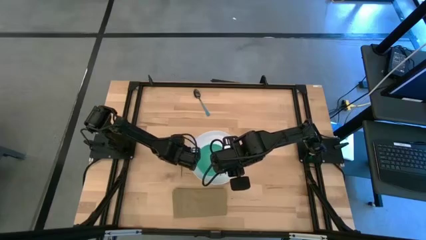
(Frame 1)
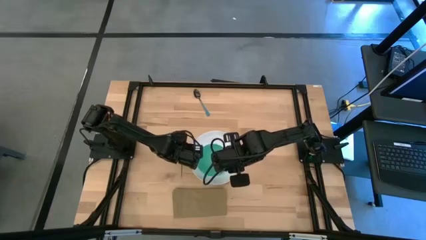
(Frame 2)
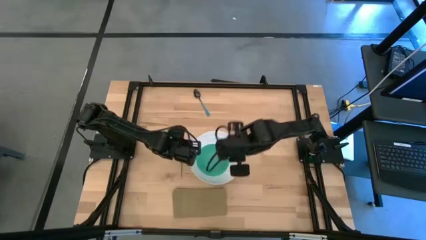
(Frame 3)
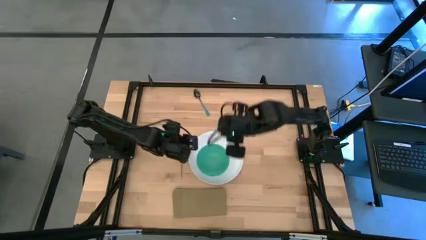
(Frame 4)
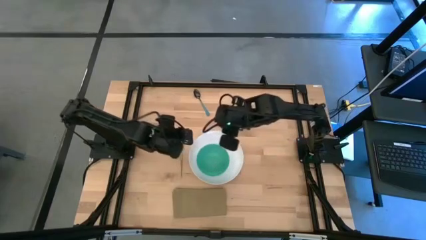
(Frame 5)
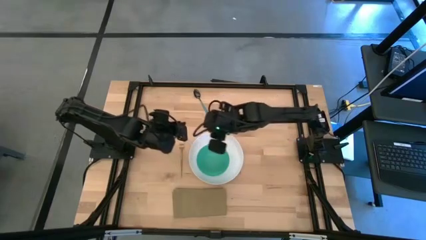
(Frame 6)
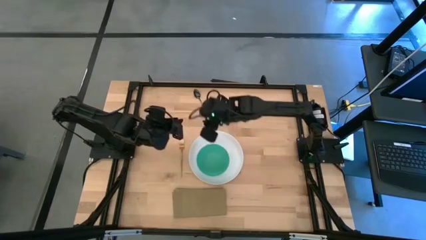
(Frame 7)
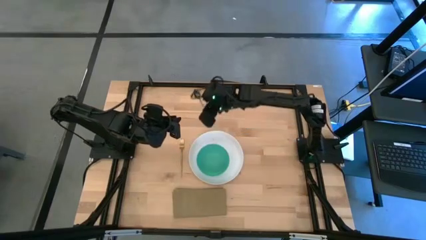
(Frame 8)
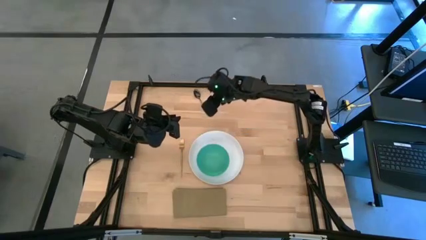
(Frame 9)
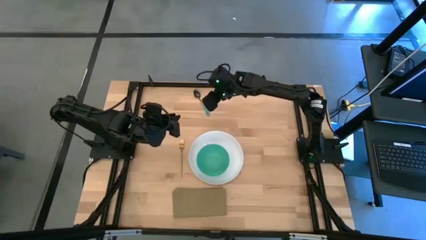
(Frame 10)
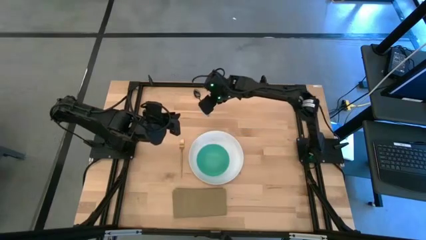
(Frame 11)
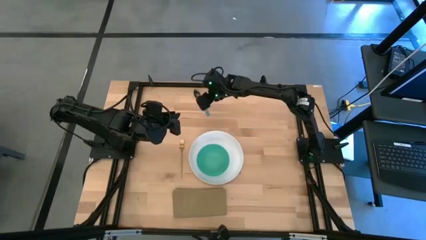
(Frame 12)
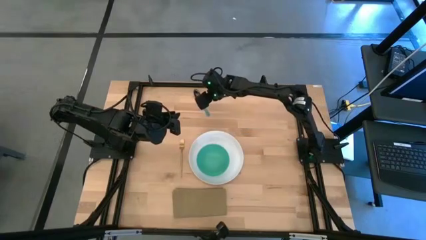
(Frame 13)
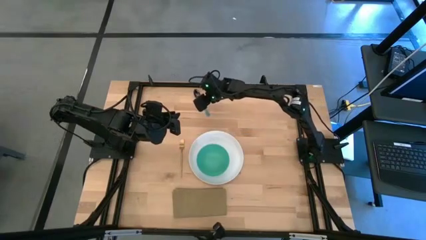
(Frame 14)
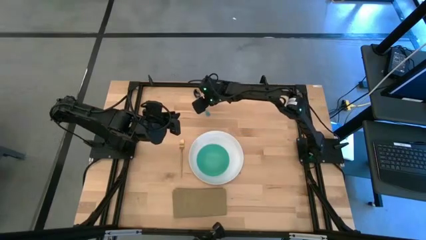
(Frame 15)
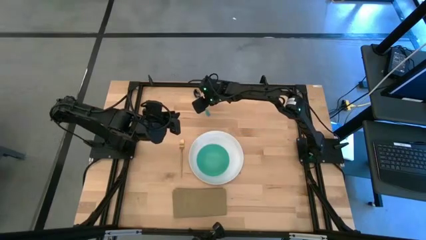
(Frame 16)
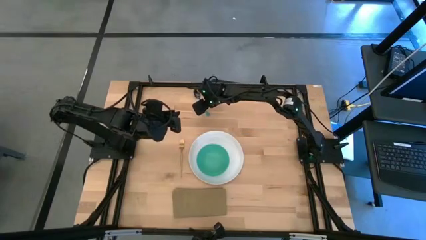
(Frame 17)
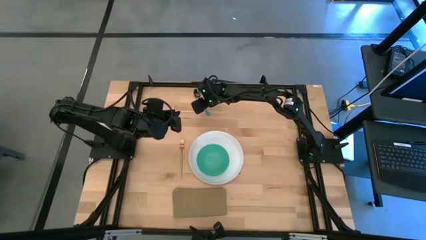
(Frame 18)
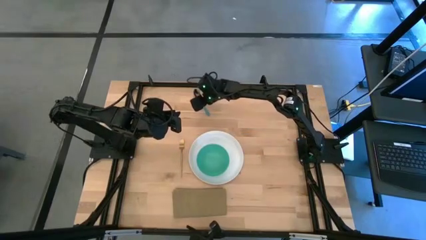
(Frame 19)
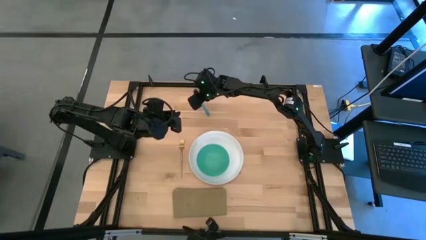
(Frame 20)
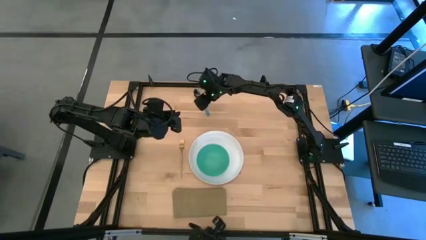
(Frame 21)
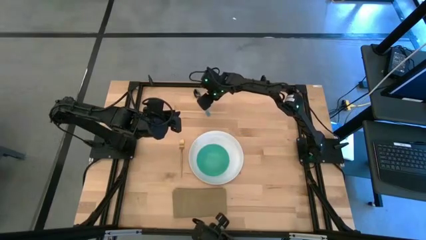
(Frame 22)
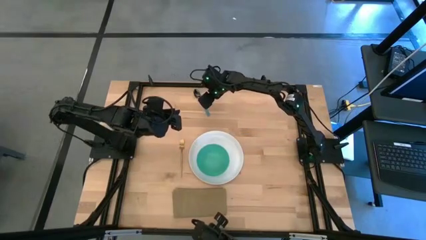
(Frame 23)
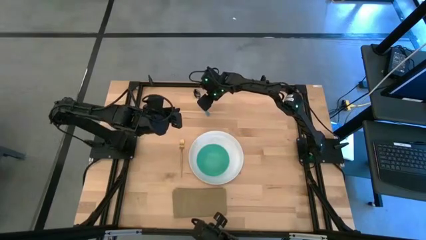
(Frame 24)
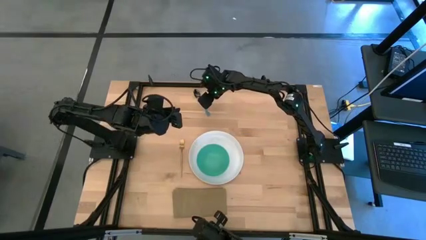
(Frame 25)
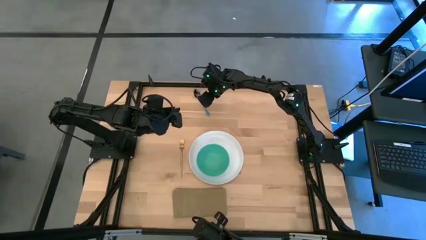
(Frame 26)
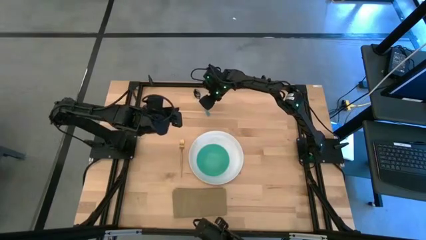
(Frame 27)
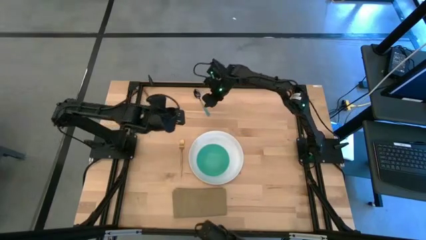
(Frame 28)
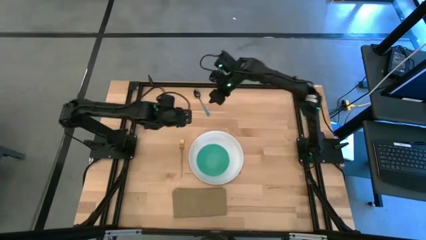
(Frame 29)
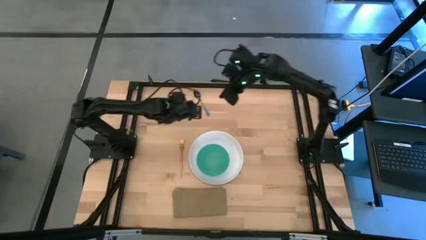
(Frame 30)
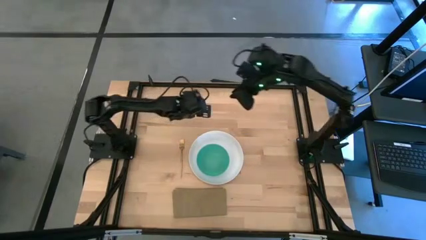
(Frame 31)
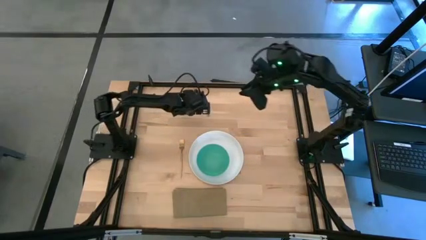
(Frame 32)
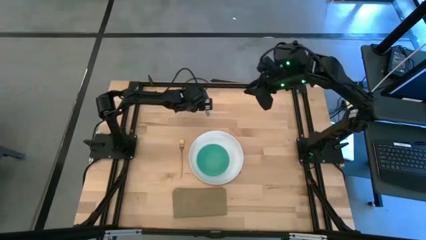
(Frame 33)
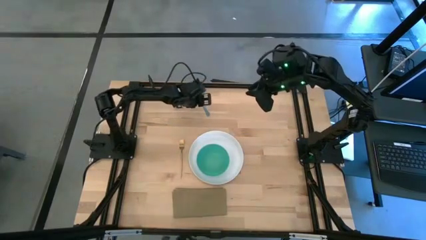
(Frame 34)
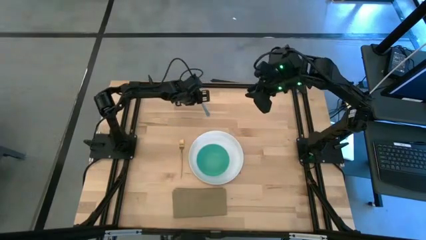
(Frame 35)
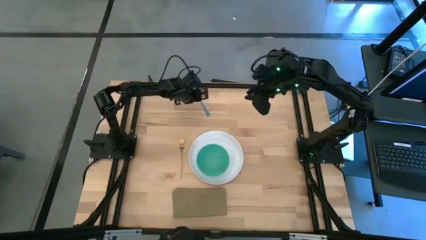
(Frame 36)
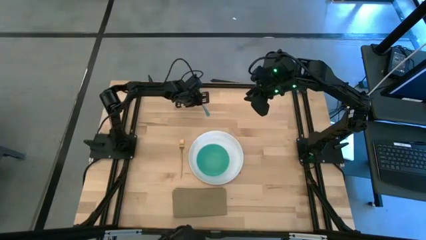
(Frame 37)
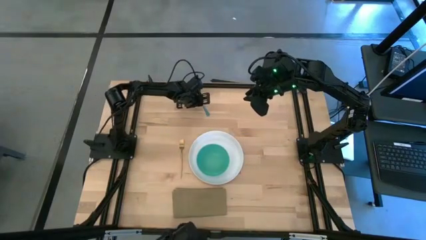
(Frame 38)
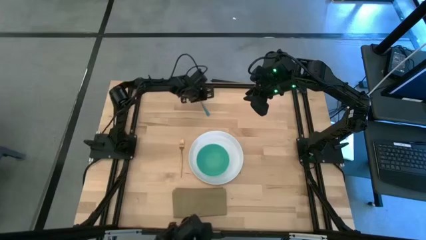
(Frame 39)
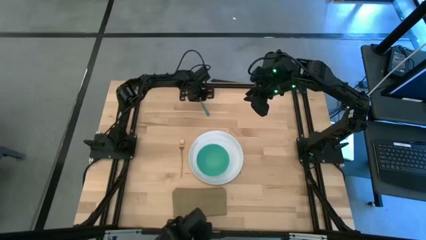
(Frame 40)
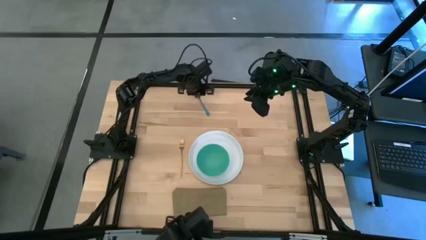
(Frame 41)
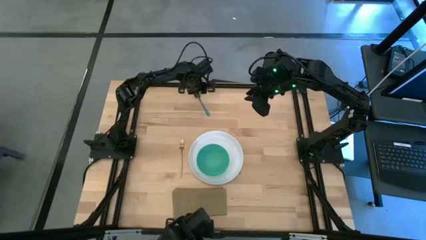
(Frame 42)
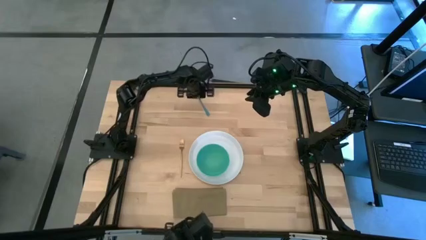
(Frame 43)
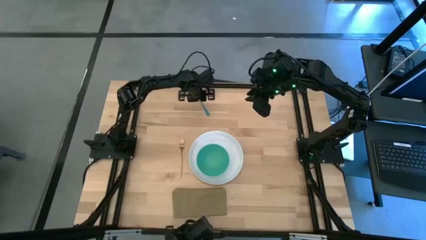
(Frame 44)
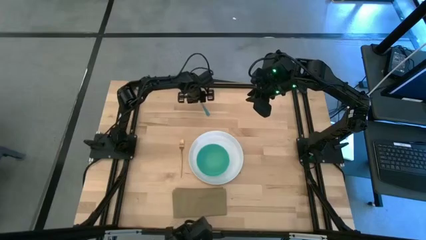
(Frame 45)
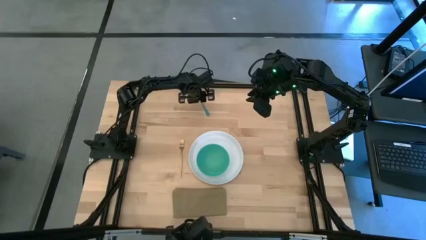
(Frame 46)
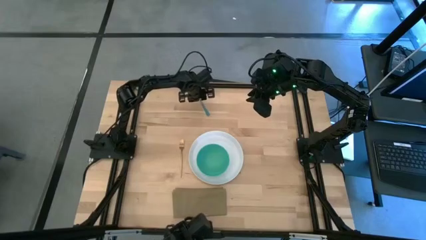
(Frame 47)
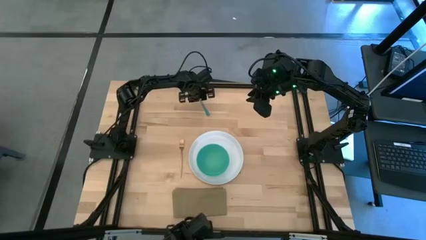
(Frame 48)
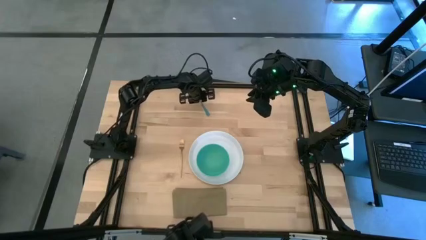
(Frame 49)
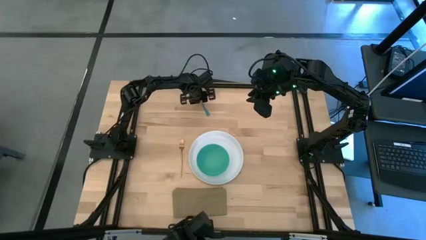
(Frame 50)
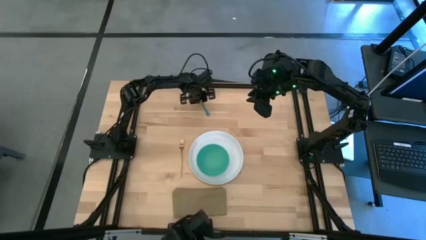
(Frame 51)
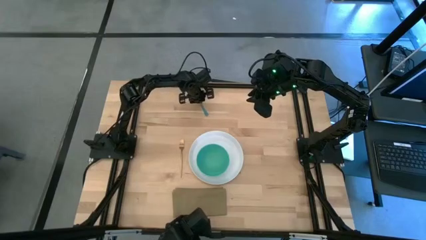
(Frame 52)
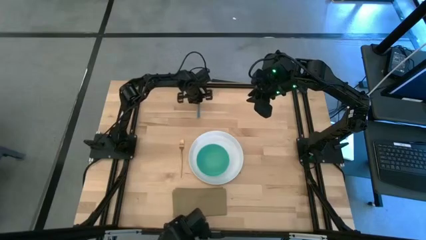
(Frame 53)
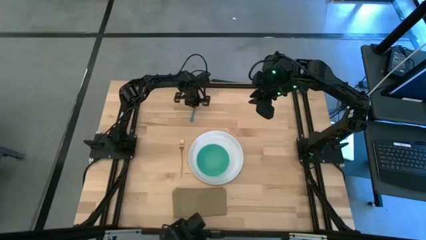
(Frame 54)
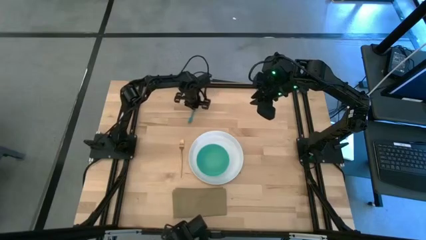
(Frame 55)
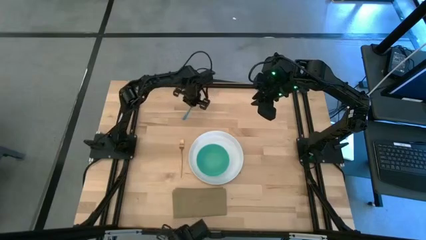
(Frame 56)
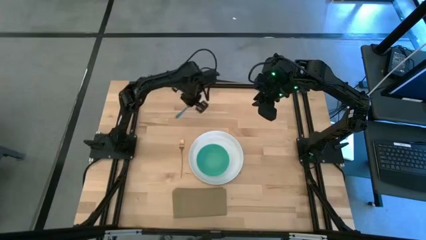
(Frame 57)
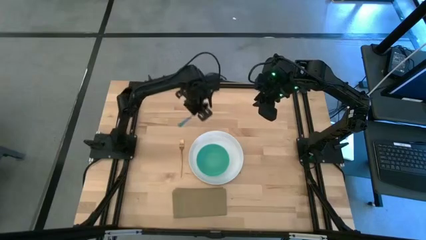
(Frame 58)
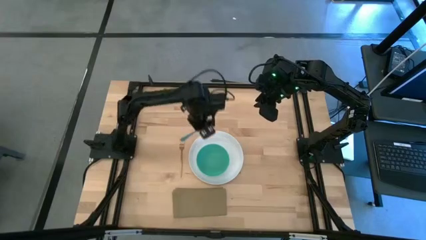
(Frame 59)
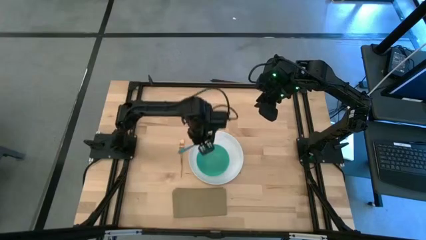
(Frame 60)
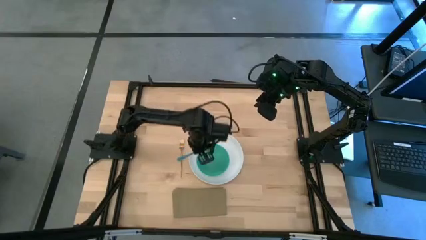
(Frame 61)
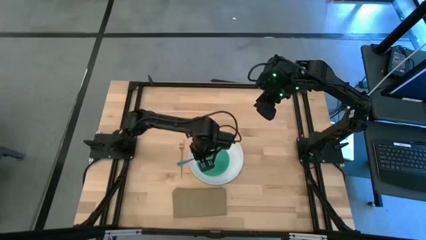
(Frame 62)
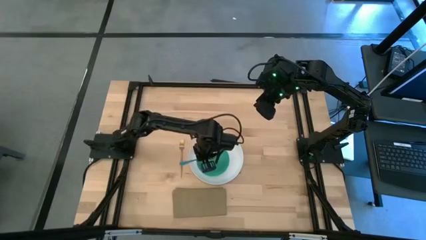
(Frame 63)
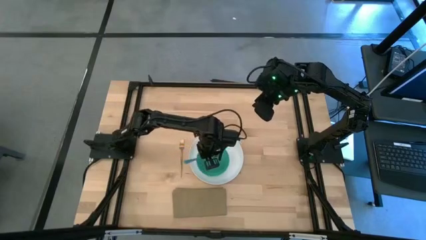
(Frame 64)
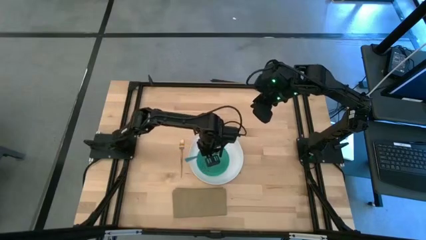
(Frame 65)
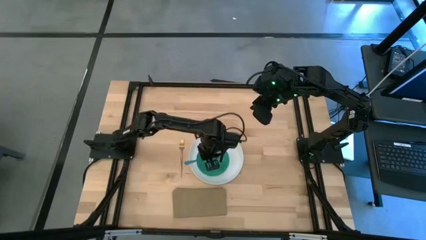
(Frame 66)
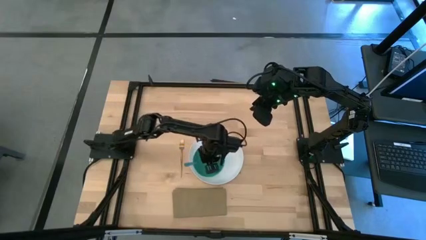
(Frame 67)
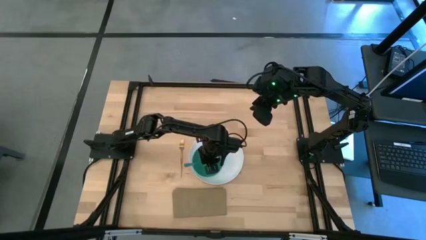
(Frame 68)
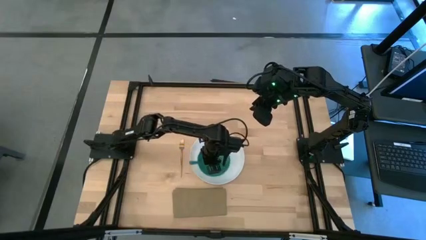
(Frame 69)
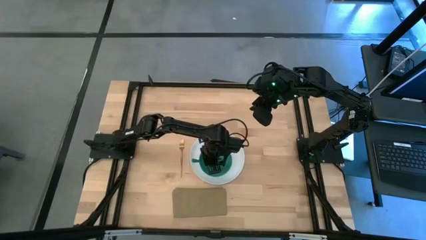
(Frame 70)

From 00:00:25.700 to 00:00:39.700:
Task: Set table place
Put the blue spoon into the blue bowl
